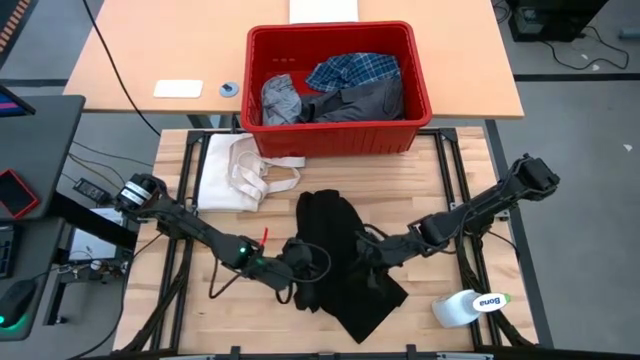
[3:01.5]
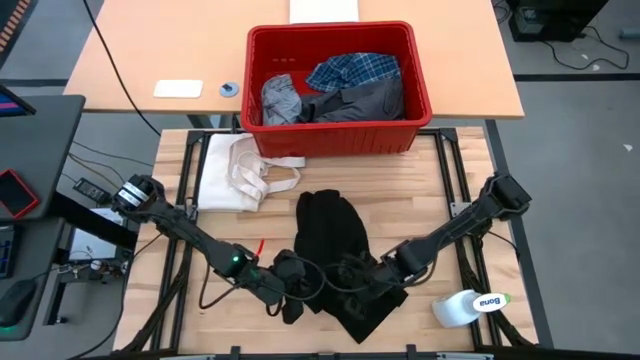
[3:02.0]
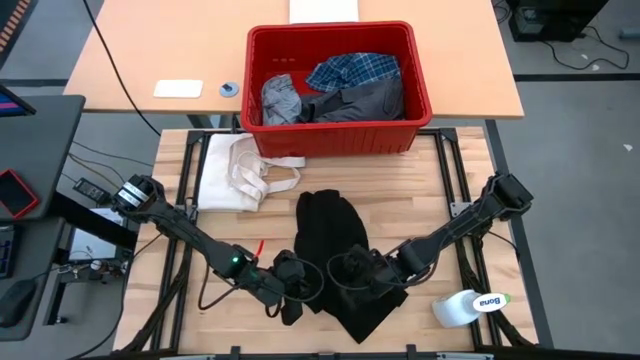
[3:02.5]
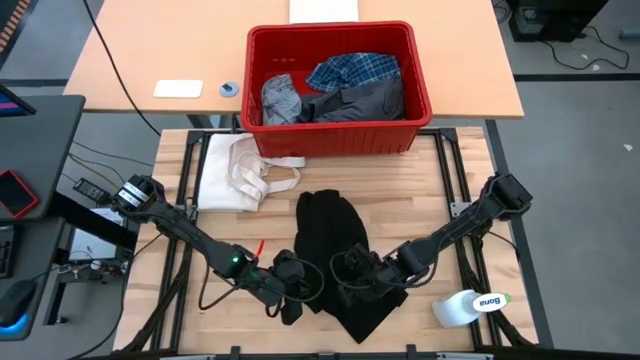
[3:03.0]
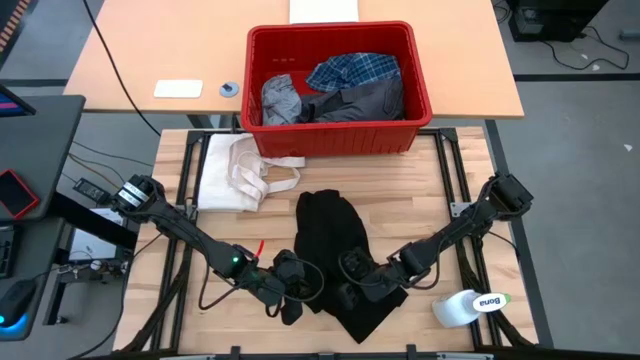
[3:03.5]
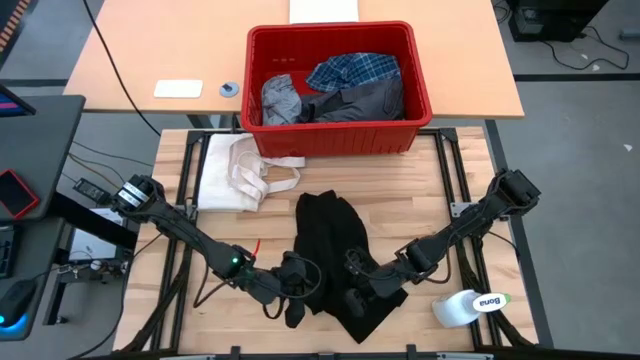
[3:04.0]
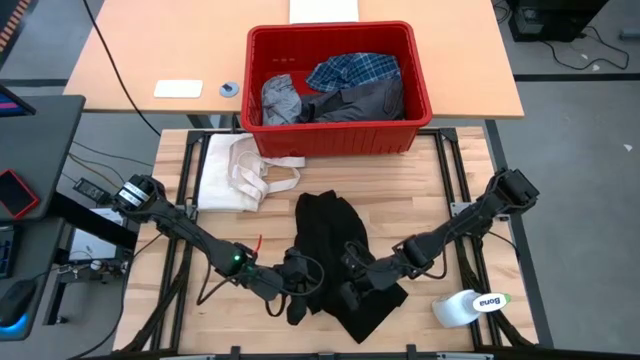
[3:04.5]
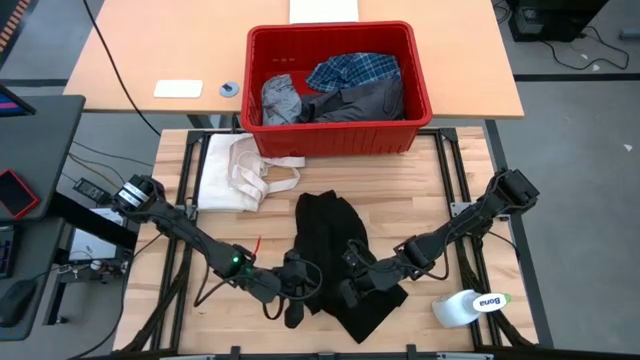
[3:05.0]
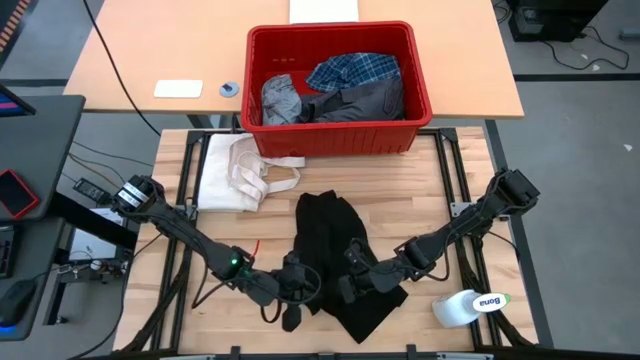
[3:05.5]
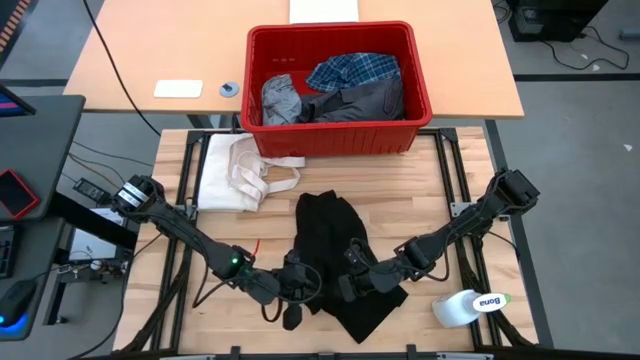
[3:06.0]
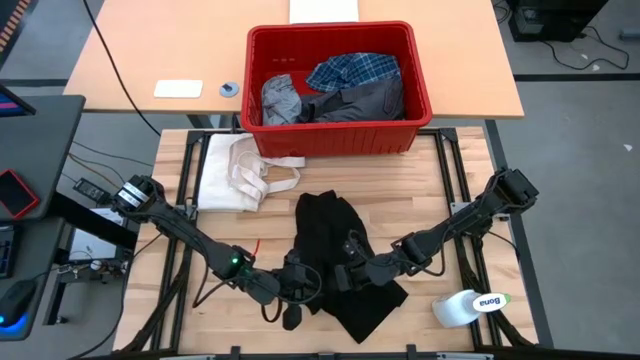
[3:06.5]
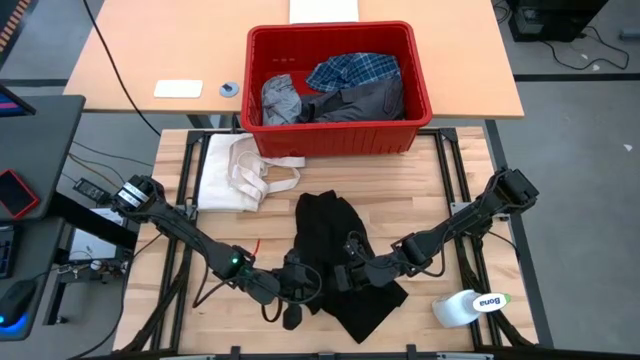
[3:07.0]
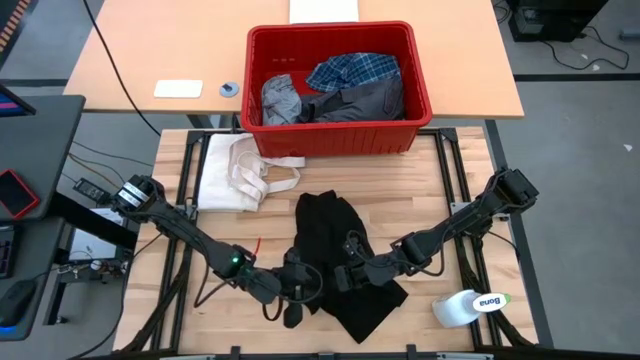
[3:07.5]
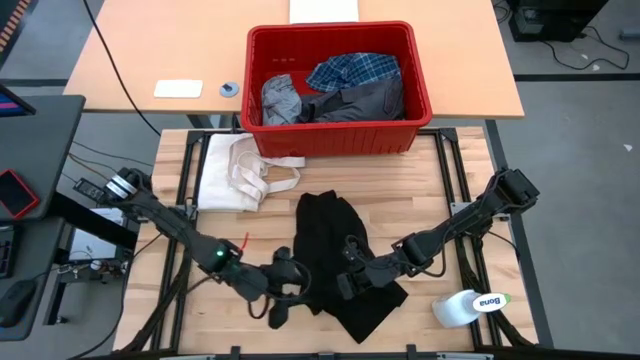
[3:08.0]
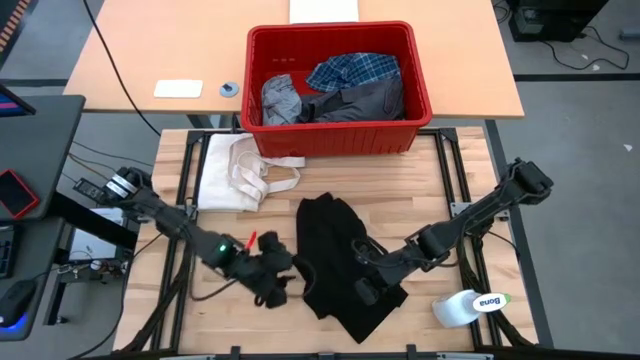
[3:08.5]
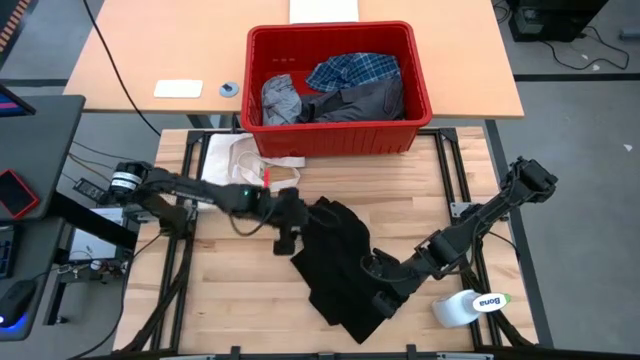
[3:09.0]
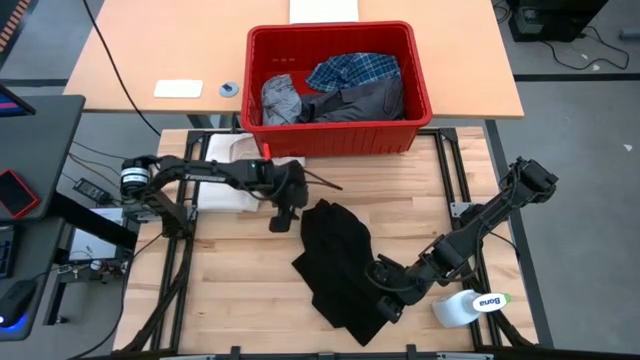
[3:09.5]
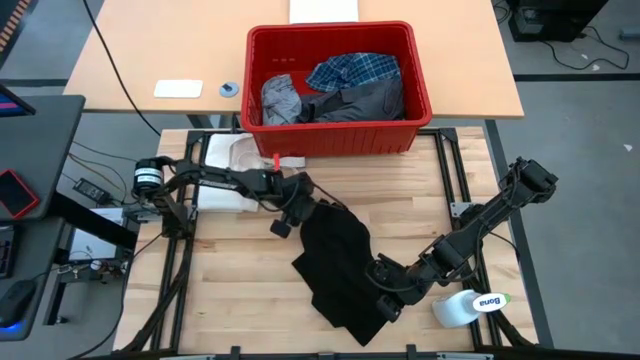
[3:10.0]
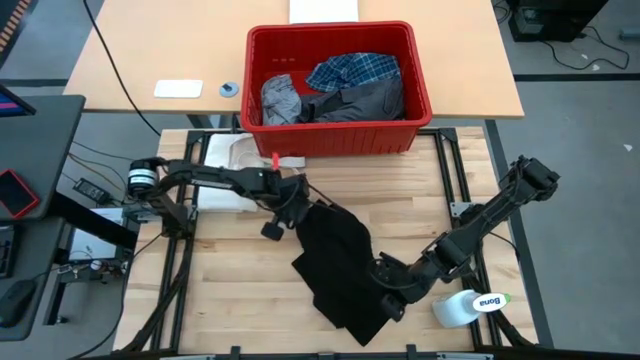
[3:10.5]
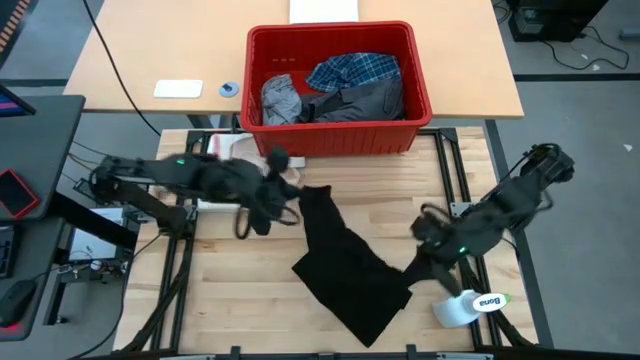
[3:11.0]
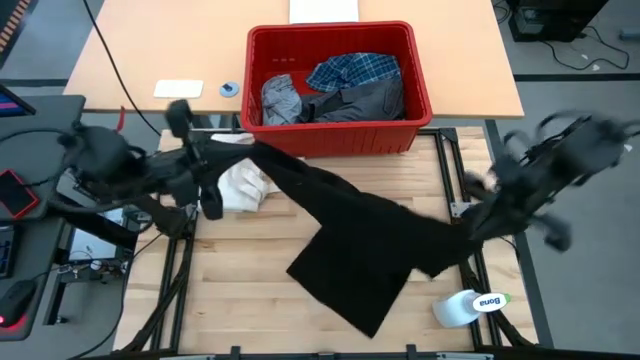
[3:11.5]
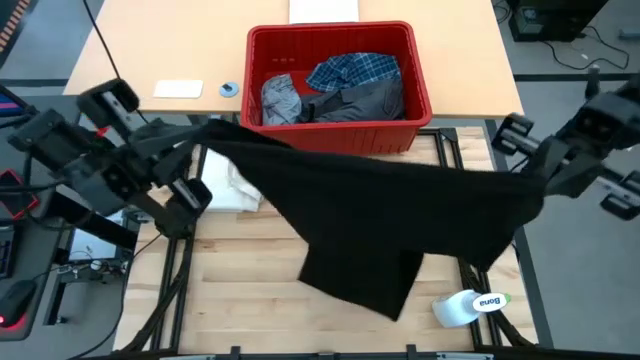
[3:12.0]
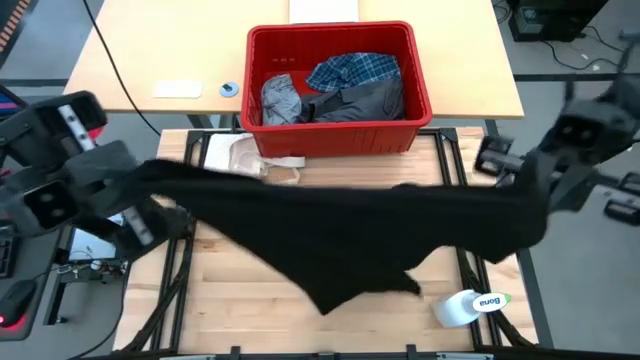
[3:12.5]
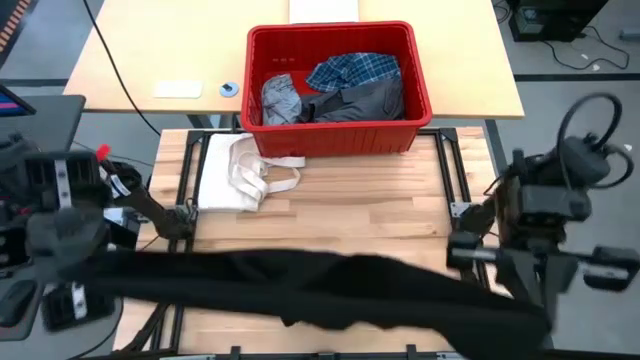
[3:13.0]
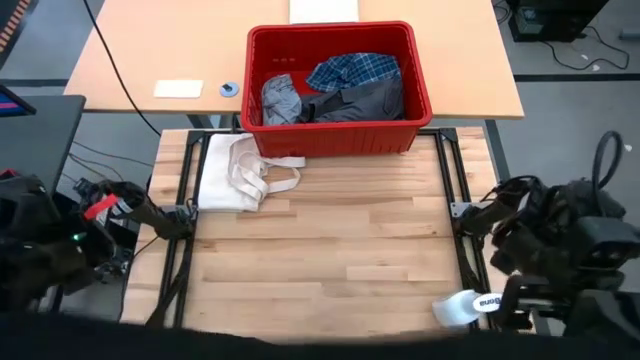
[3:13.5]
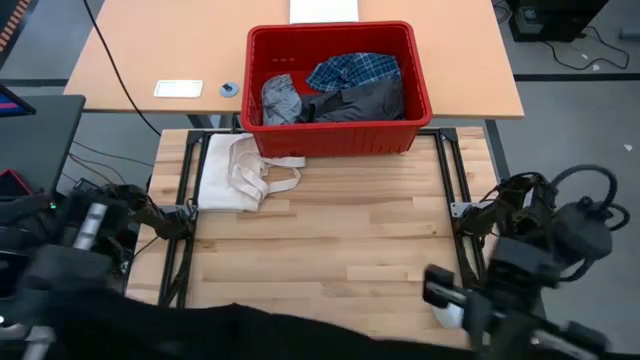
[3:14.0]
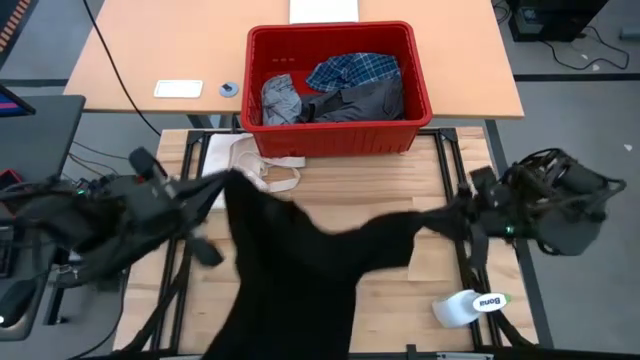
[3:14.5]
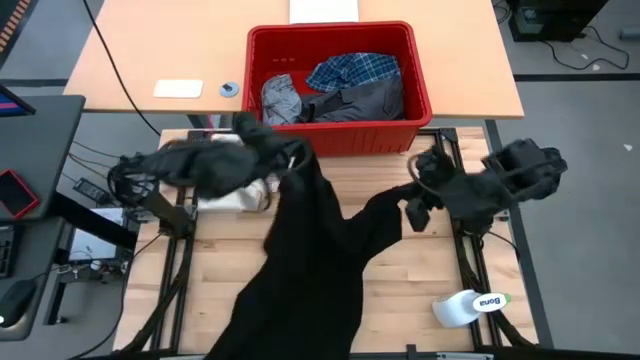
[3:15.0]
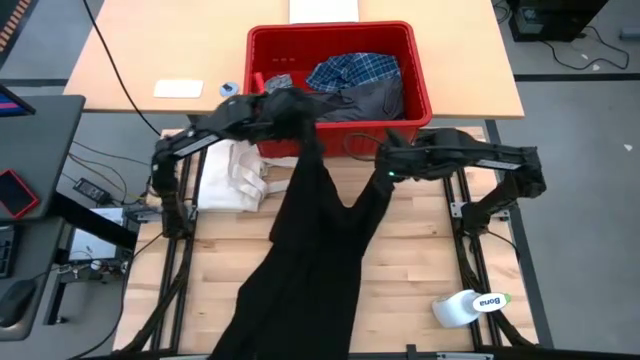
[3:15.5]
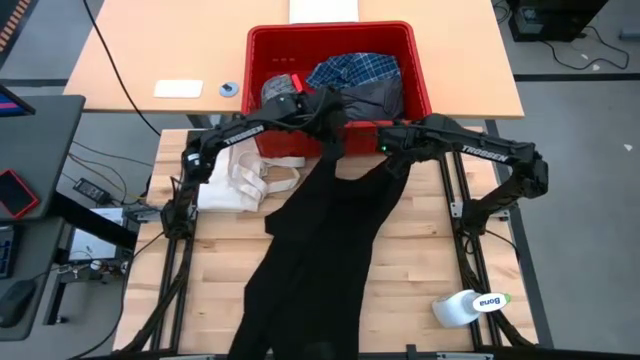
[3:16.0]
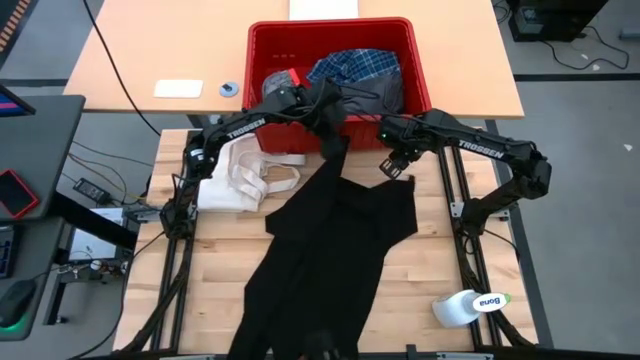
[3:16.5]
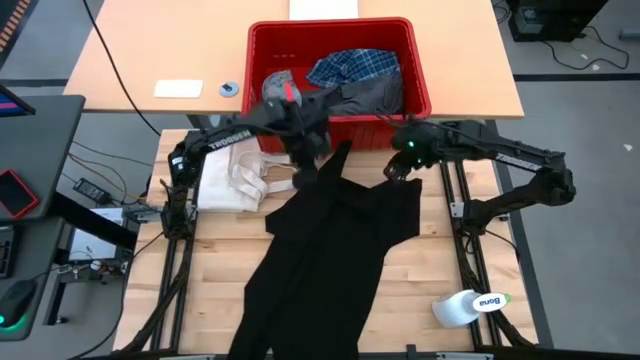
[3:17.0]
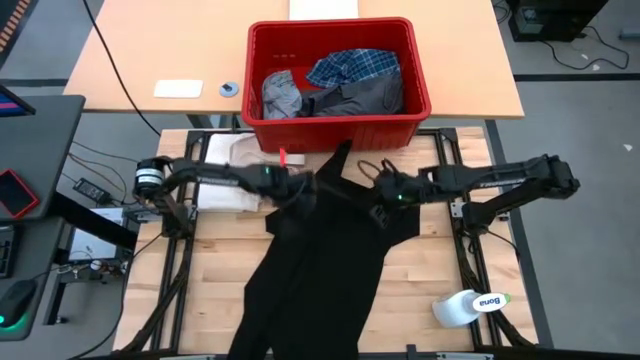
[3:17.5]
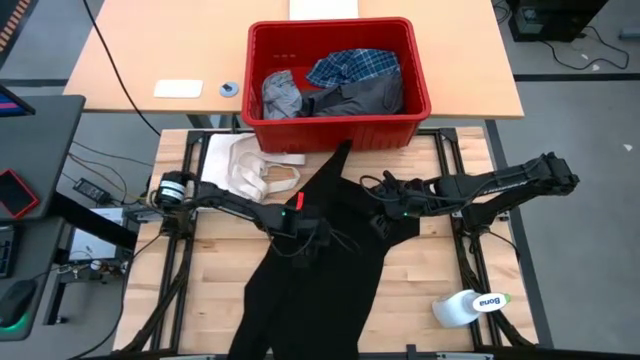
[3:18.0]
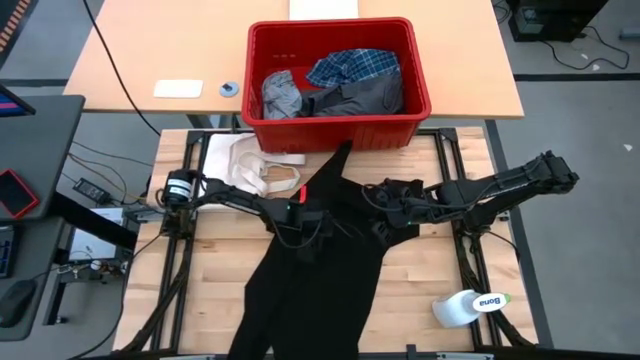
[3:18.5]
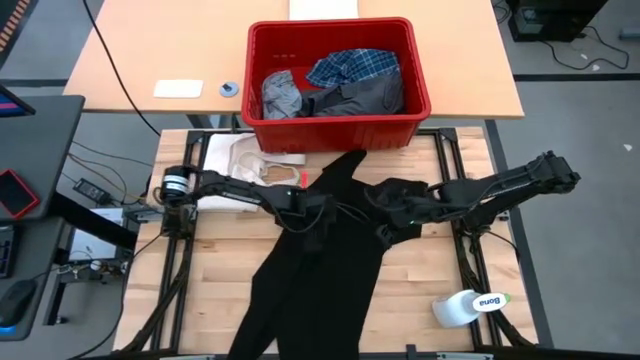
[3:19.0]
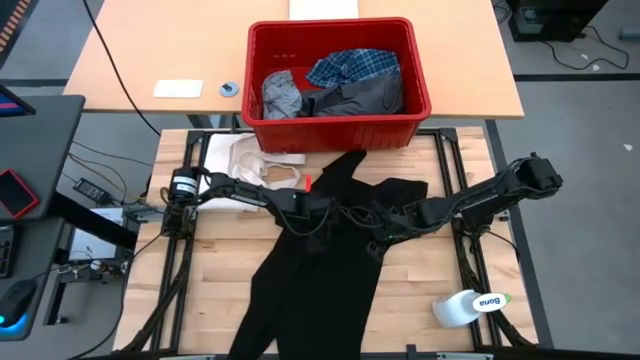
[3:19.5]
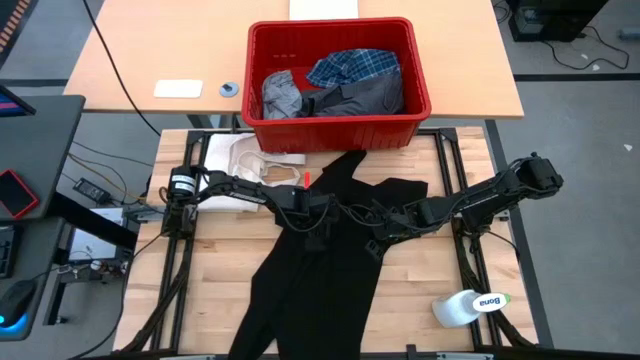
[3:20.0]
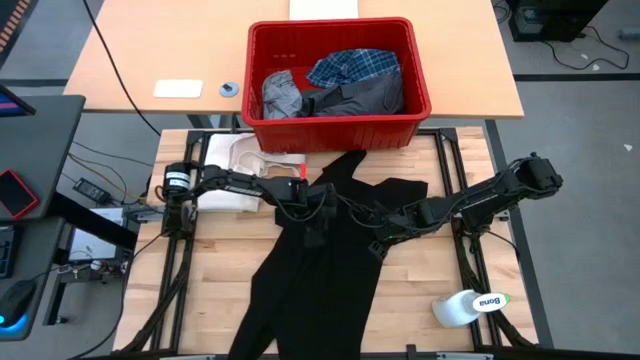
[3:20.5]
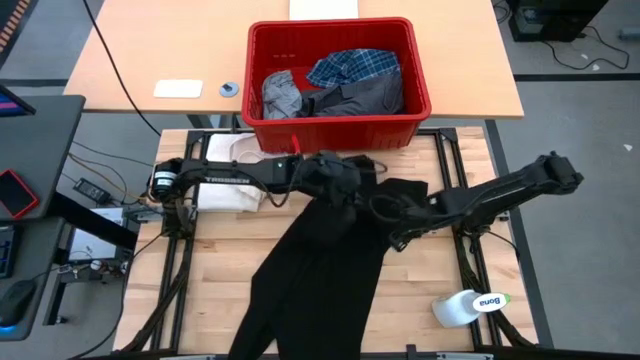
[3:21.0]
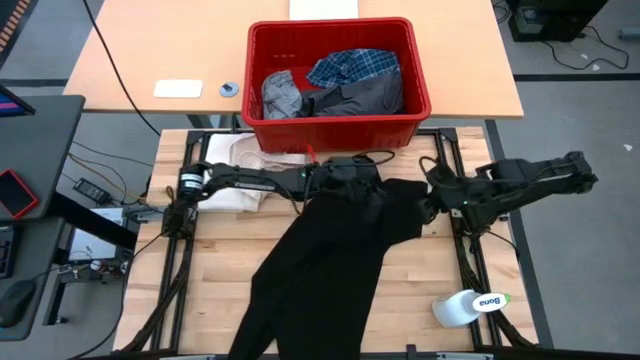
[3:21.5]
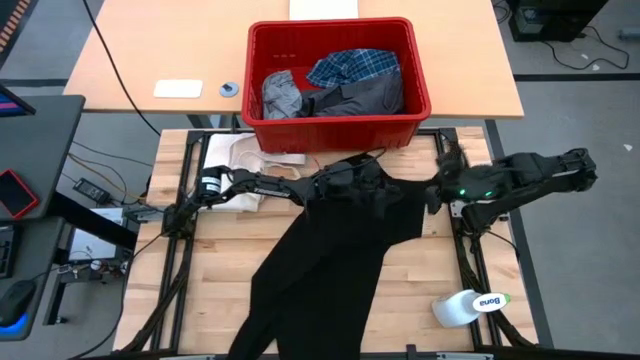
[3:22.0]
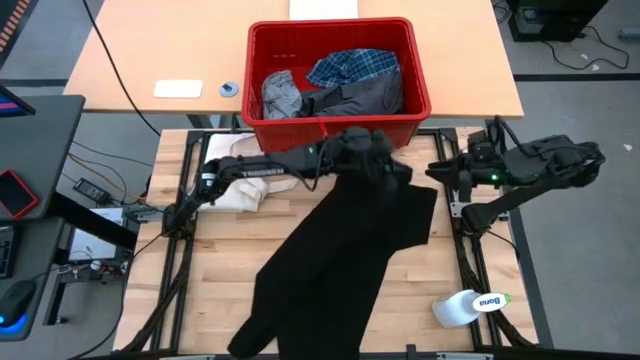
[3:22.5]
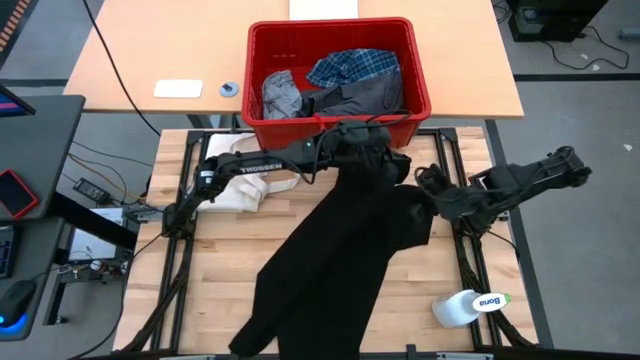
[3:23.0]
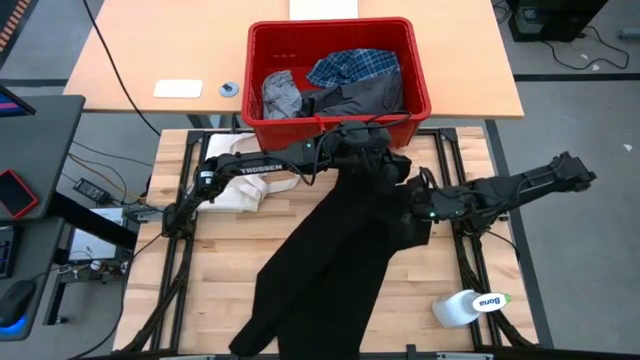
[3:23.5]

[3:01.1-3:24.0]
Task: Fold Laundry from Bin
Fold the black shirt
